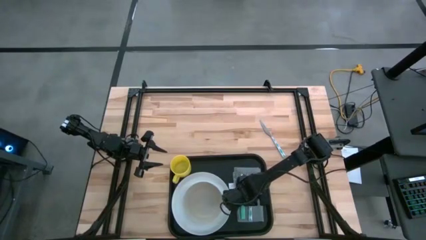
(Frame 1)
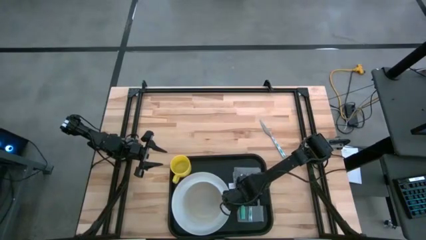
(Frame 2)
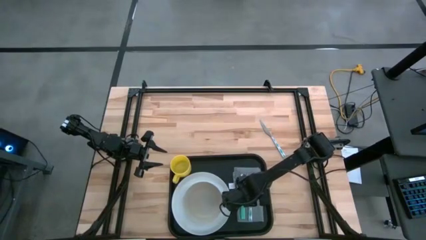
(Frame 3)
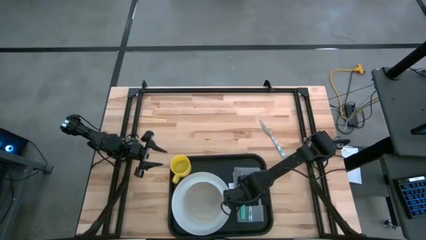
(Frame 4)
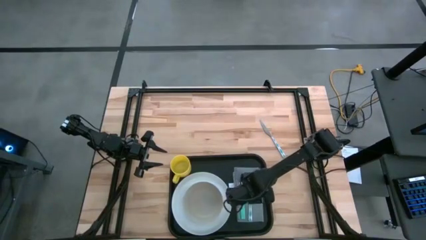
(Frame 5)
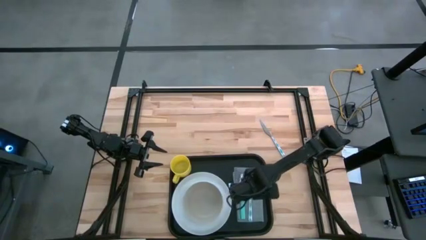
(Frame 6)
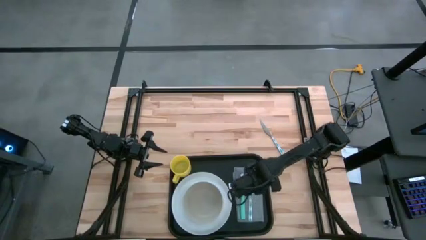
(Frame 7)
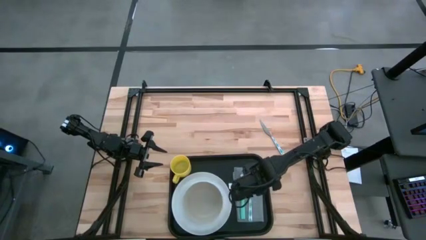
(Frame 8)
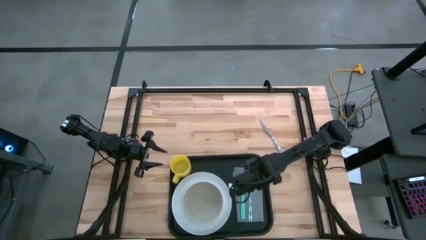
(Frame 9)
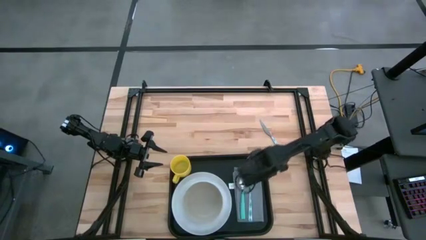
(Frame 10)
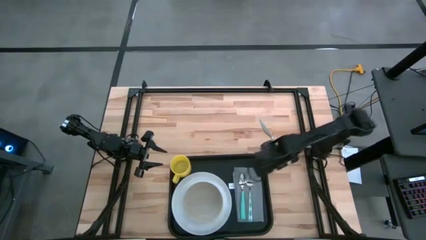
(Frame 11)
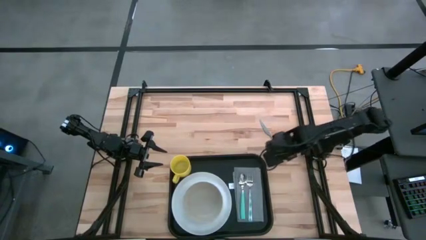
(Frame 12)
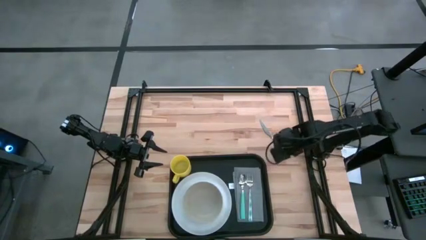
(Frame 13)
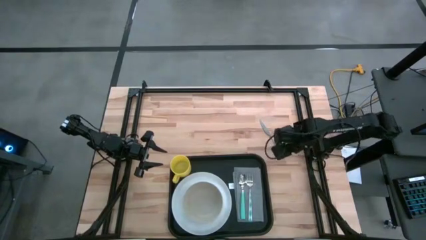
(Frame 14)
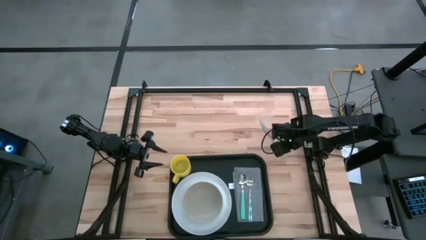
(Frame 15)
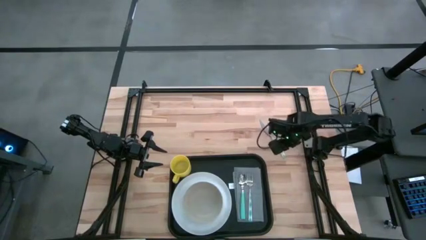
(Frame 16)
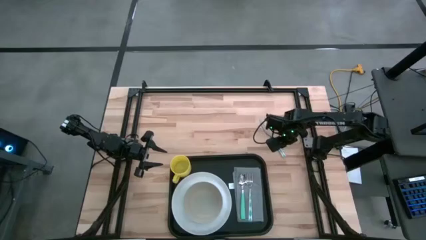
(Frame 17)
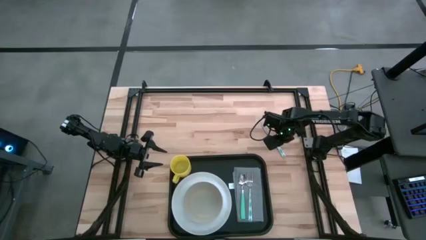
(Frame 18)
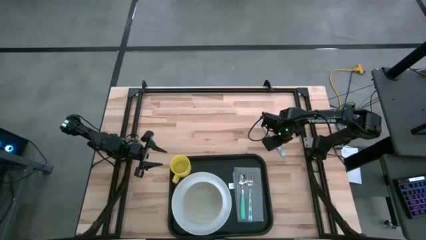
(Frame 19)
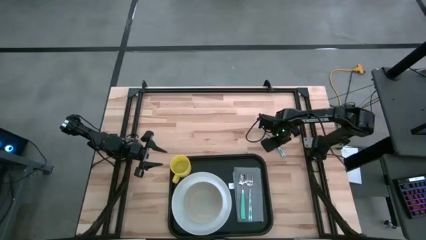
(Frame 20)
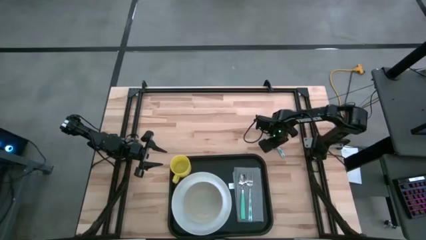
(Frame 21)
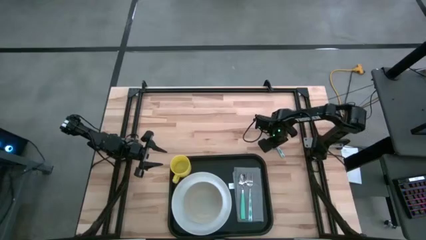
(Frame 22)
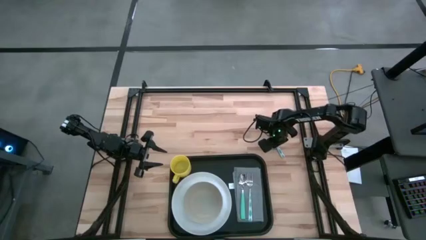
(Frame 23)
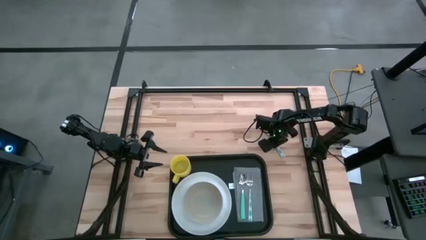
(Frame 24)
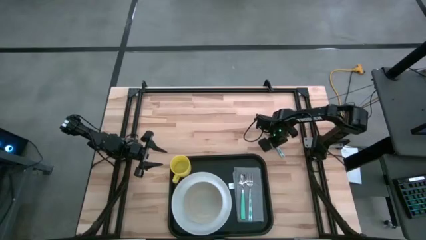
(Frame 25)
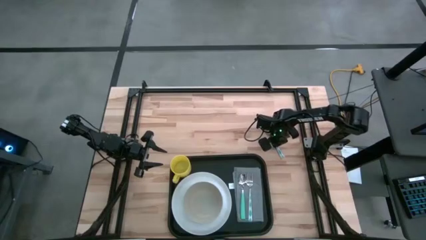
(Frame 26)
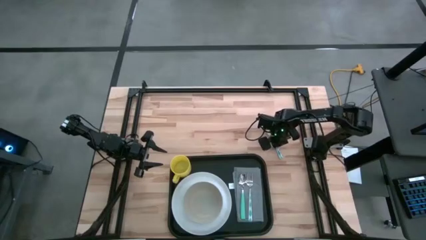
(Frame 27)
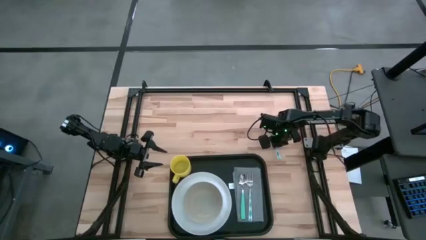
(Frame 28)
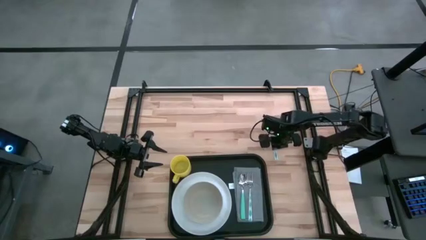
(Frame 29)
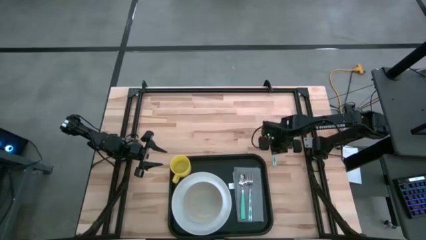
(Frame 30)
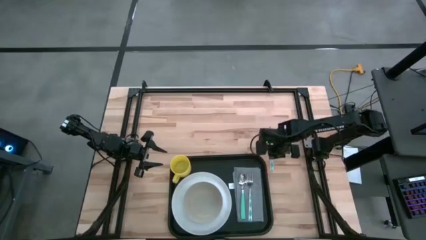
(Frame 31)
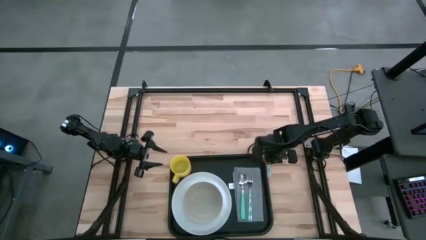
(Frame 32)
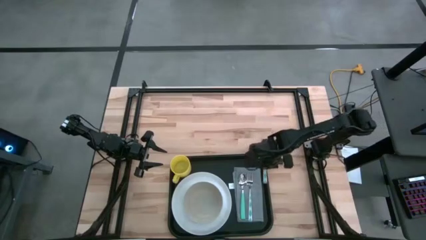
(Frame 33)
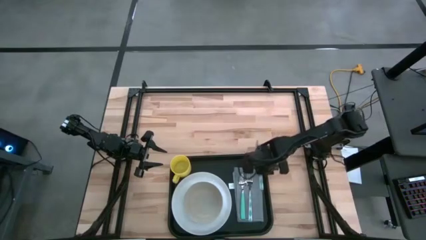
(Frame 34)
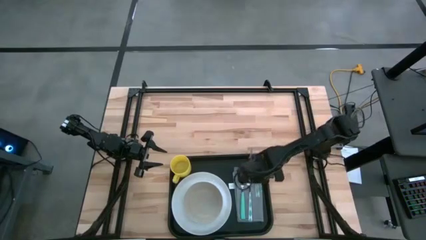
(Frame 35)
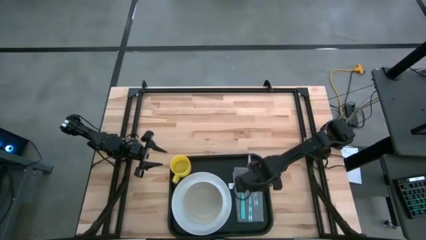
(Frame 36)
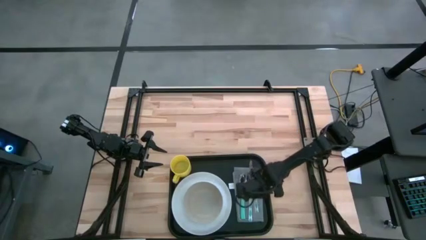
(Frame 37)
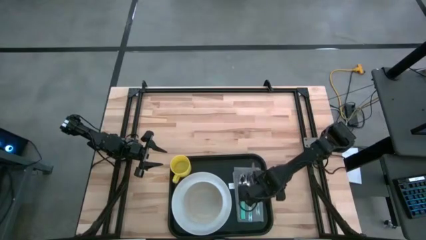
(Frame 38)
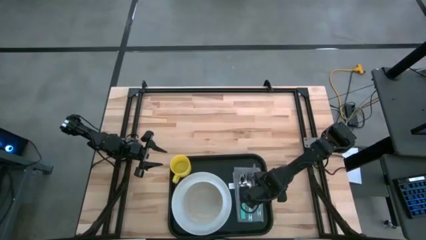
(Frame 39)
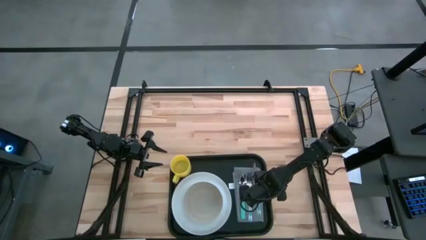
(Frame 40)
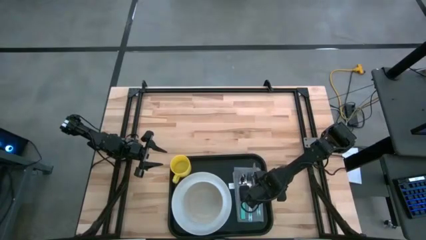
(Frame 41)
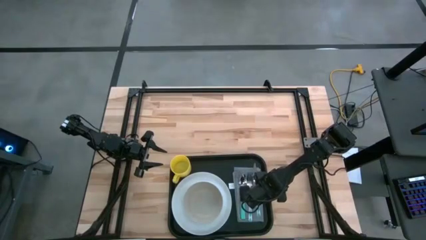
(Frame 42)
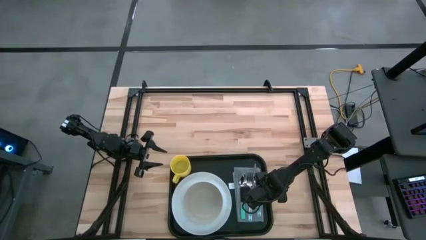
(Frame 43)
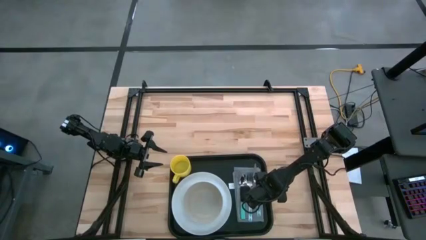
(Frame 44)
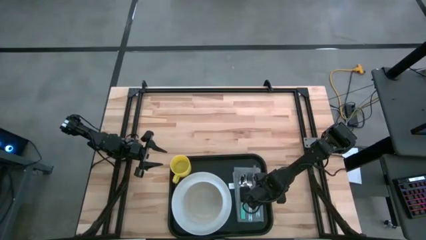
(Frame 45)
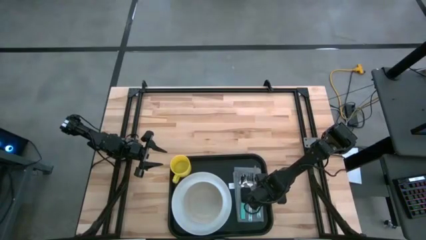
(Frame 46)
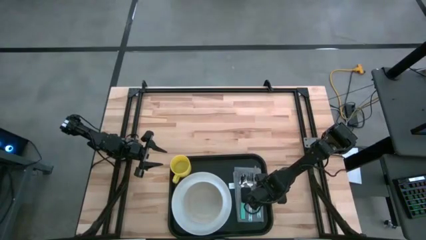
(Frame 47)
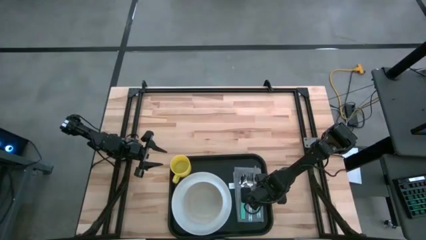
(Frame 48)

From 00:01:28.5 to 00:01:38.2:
Task: Set up tray
Put the white knife to the right of the white fork on the gray napkin on the black serving tray

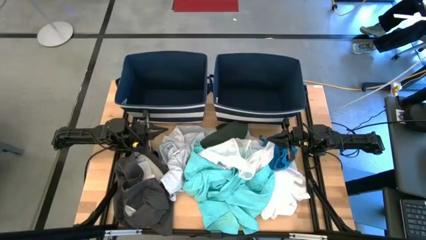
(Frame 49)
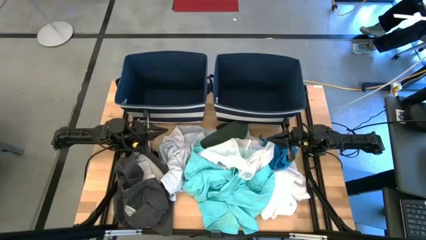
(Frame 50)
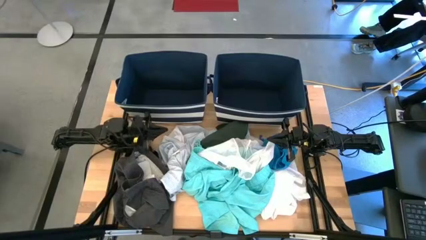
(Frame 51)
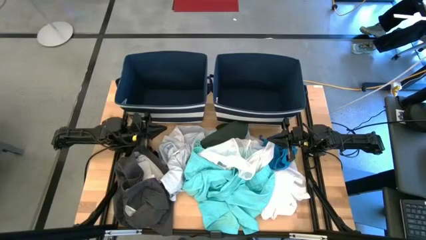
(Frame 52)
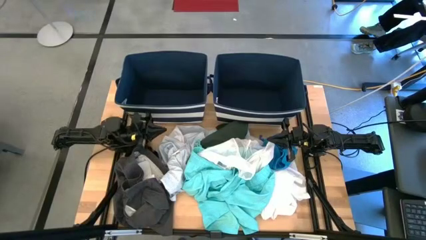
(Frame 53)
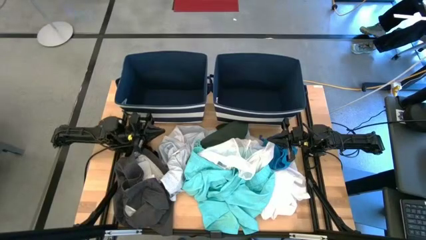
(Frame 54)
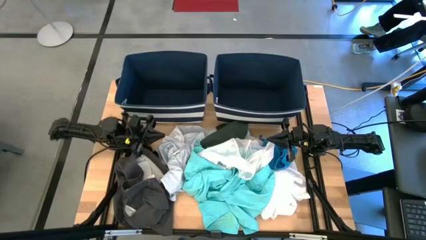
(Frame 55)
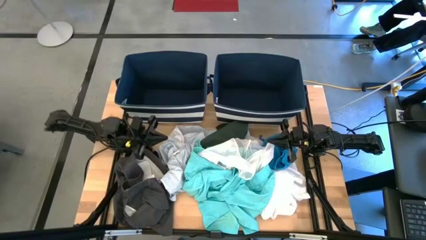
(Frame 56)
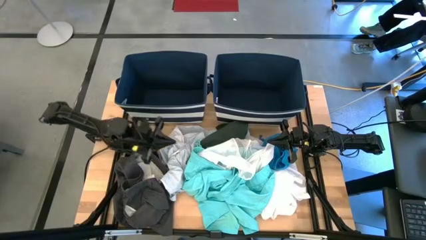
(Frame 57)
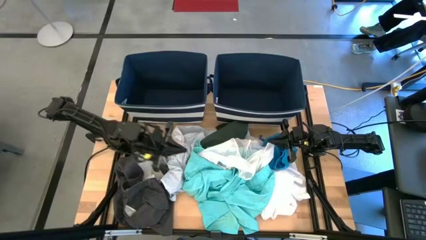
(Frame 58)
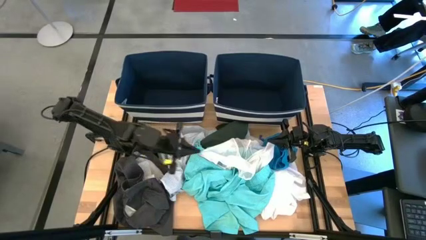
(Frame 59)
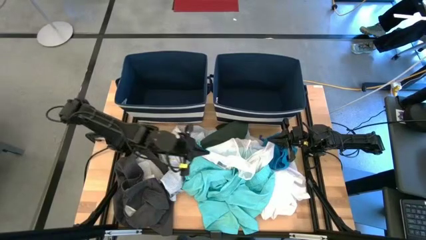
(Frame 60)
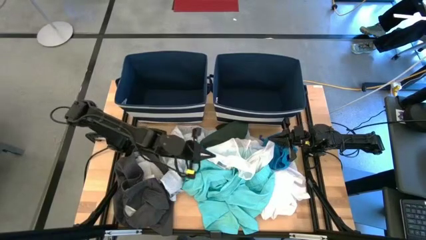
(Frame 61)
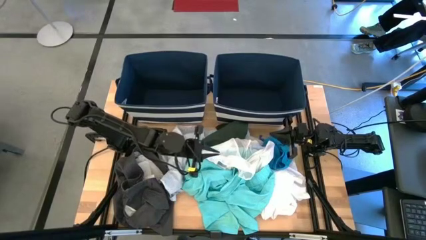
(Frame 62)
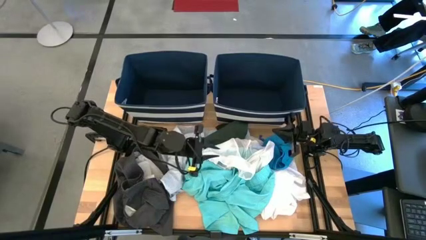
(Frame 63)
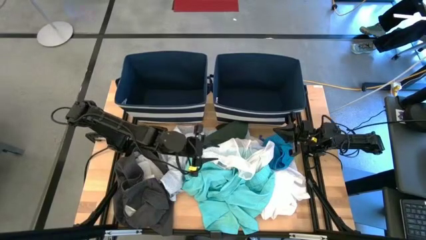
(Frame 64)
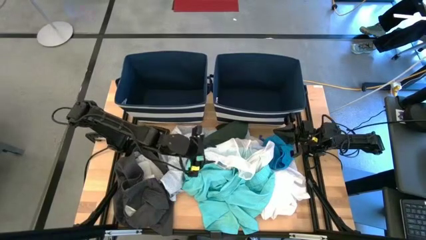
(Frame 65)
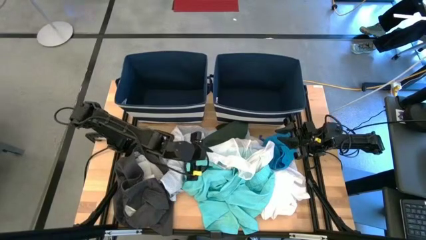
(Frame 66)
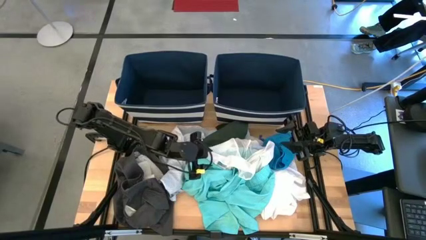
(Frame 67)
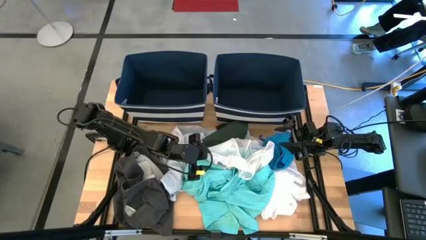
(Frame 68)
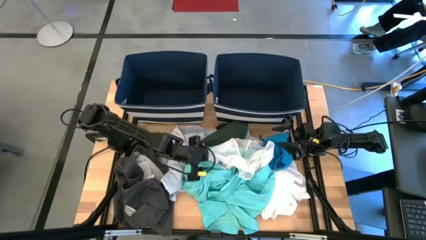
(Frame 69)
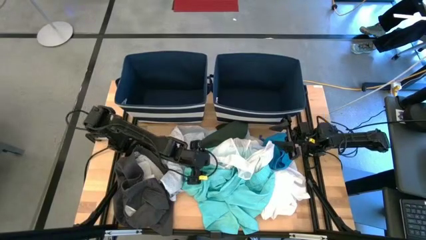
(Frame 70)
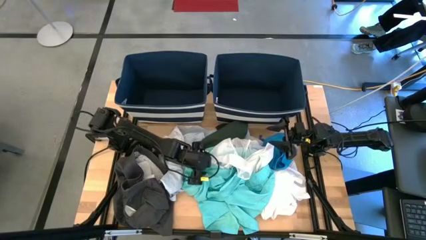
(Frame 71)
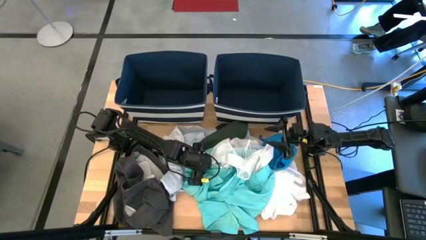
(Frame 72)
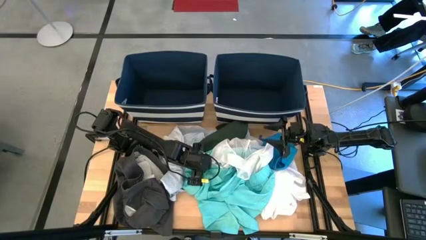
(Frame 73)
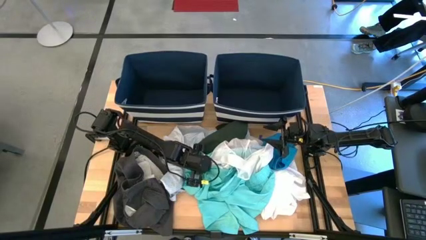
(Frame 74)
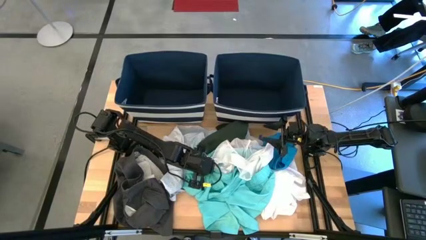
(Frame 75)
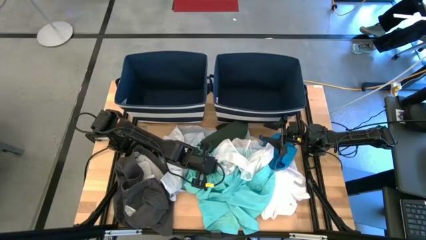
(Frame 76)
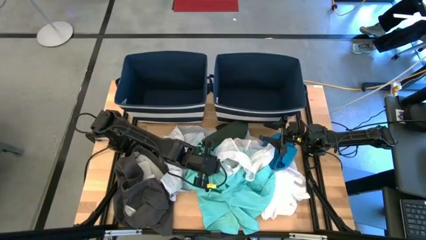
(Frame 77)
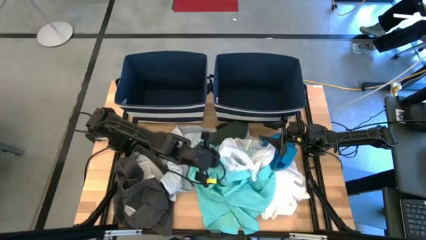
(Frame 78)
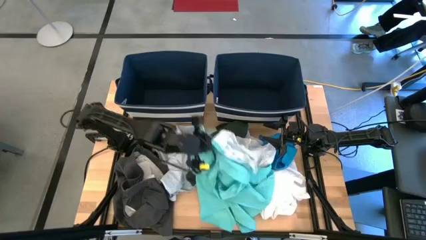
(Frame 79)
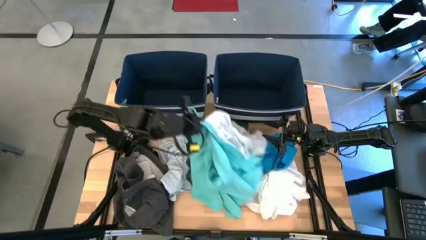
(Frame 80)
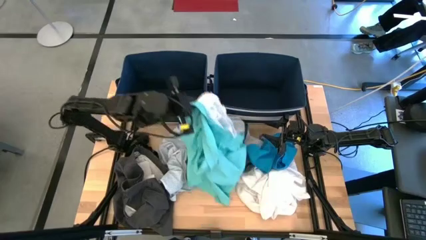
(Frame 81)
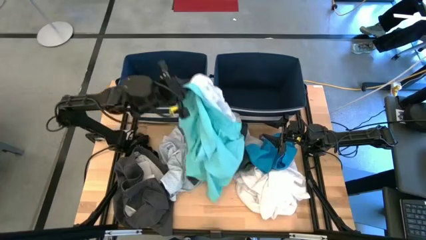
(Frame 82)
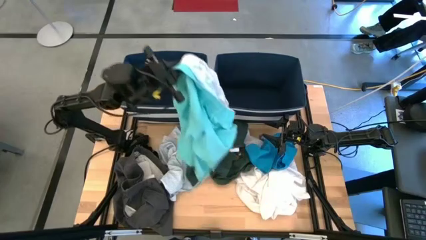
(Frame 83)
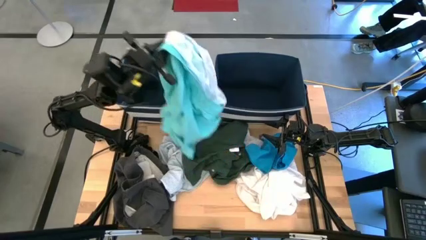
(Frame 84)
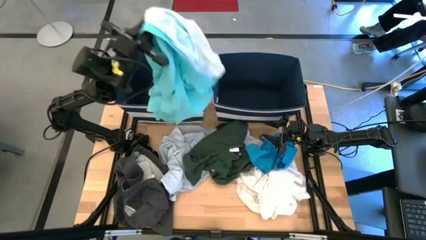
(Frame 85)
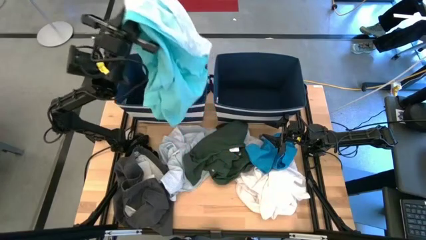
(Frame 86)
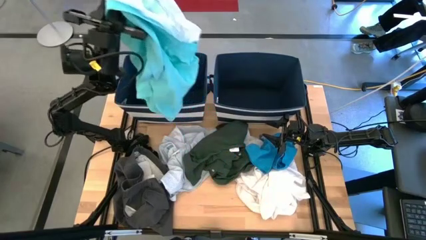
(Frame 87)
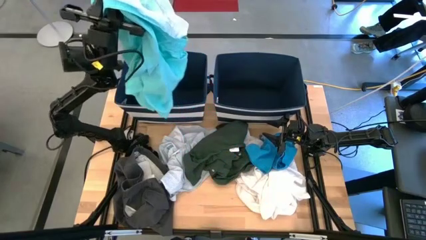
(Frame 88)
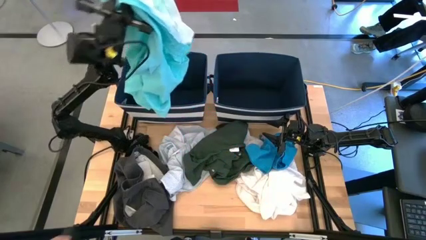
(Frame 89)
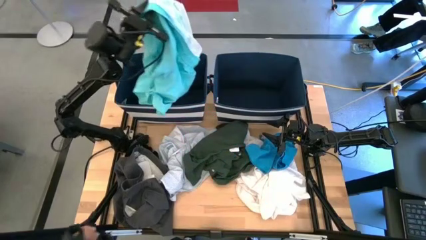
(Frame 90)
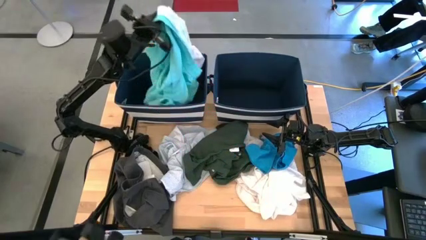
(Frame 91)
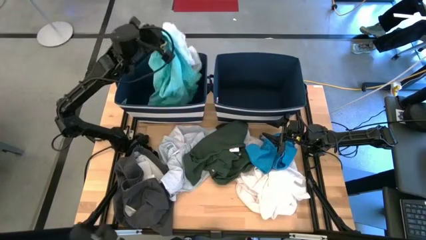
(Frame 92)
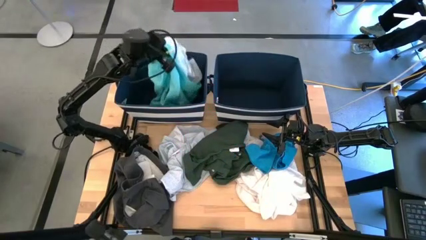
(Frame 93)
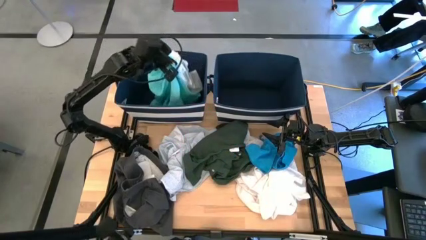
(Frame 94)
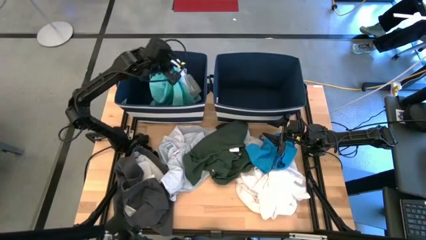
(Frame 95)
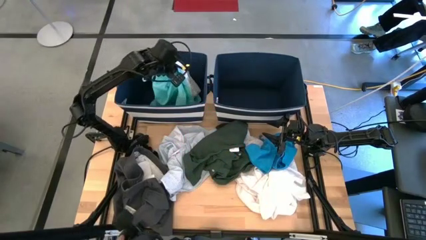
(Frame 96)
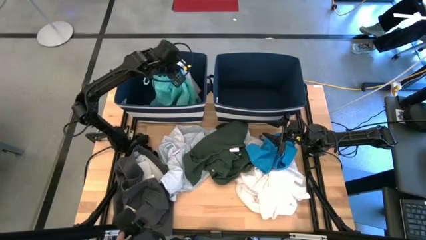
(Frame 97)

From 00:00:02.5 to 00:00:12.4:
Task: Sort clothes
Put the light blue shorts into the left laundry bin
